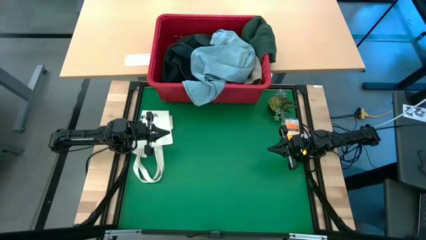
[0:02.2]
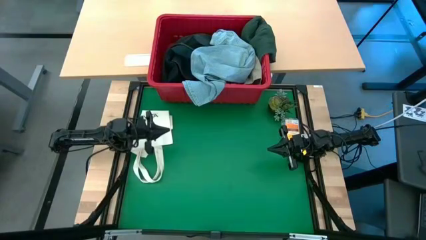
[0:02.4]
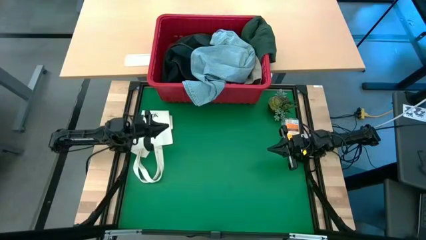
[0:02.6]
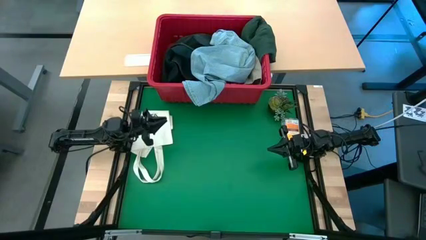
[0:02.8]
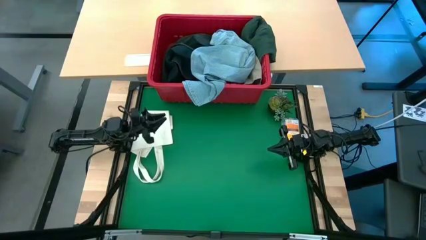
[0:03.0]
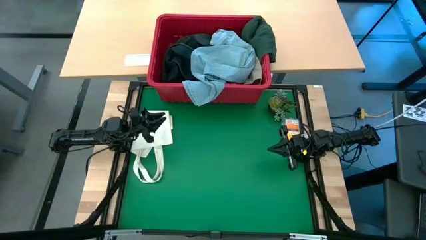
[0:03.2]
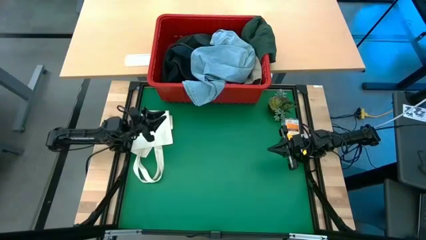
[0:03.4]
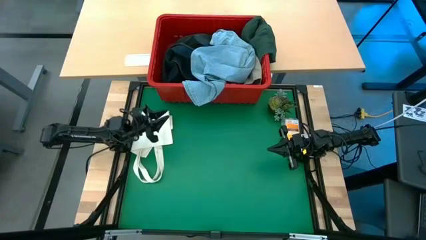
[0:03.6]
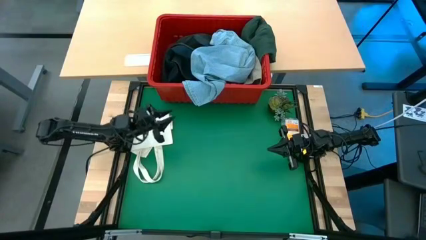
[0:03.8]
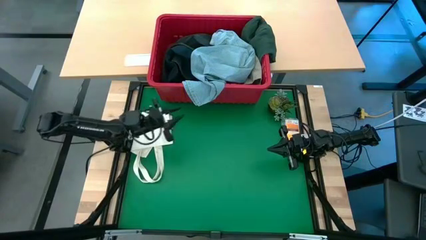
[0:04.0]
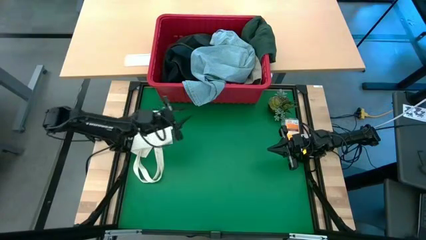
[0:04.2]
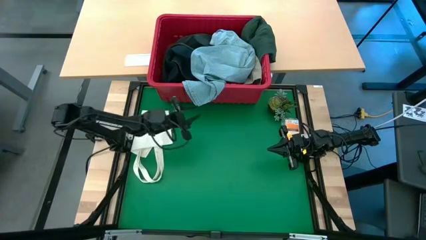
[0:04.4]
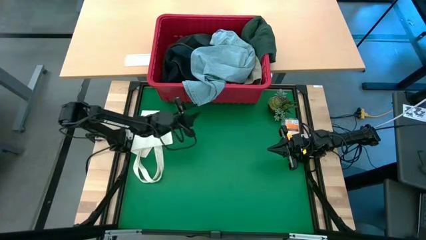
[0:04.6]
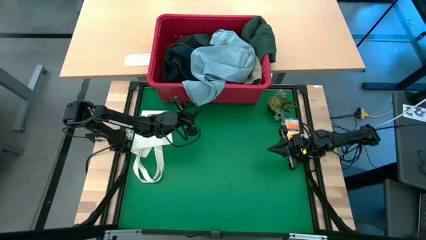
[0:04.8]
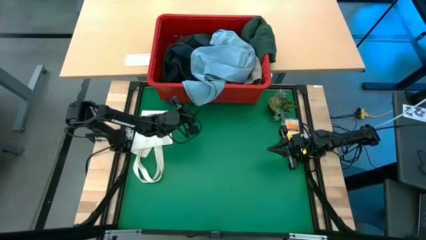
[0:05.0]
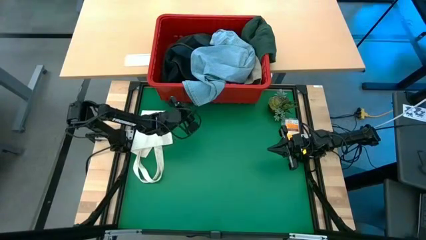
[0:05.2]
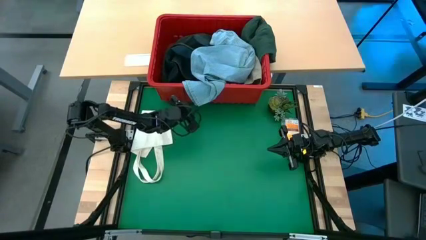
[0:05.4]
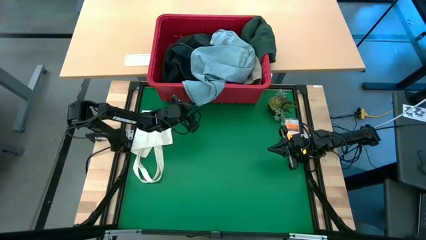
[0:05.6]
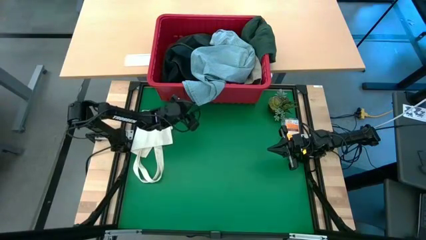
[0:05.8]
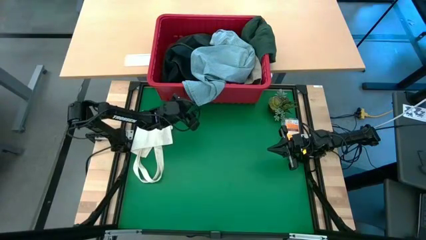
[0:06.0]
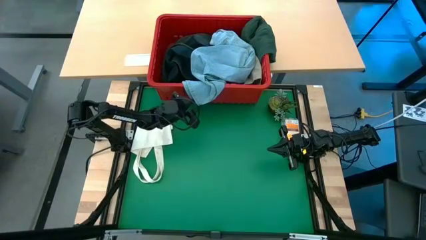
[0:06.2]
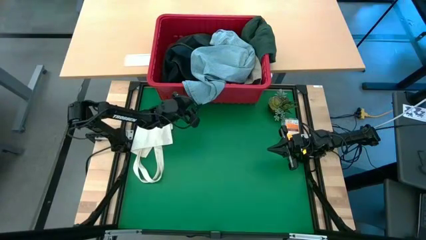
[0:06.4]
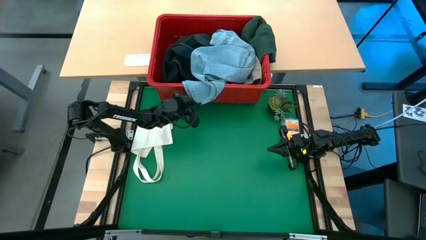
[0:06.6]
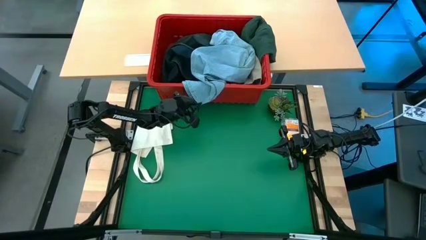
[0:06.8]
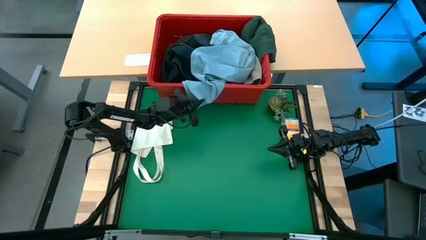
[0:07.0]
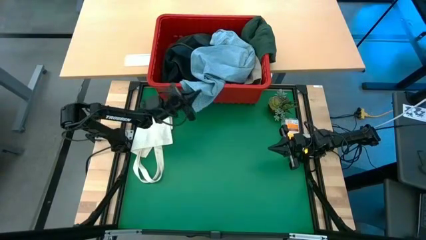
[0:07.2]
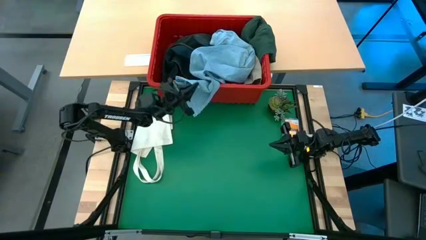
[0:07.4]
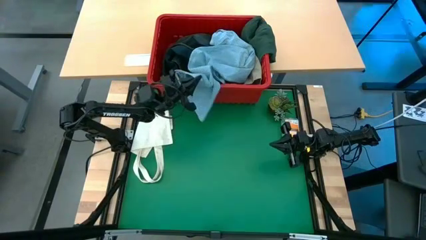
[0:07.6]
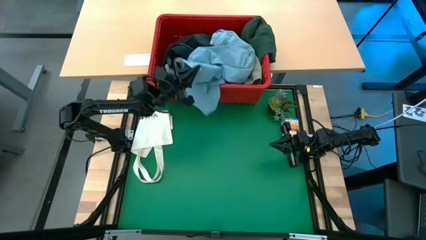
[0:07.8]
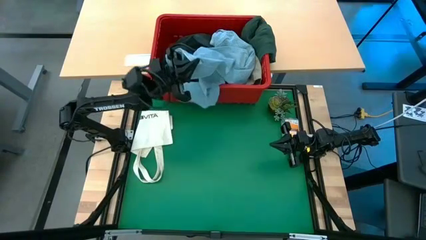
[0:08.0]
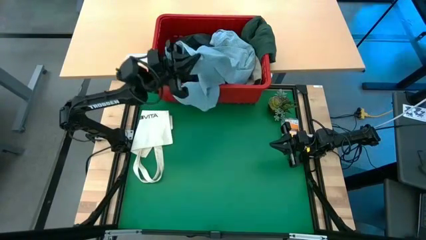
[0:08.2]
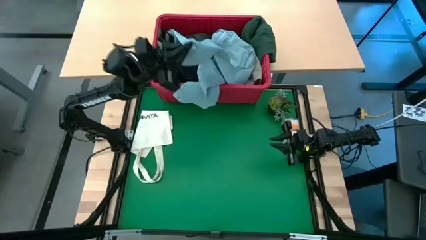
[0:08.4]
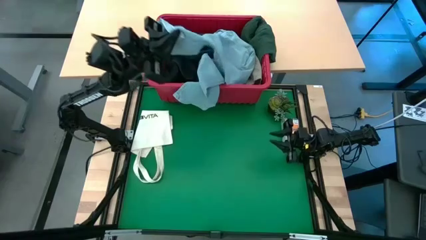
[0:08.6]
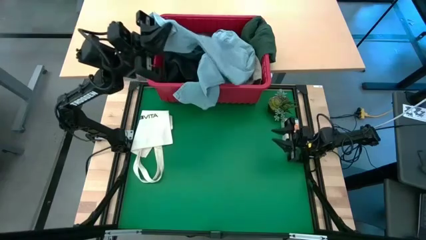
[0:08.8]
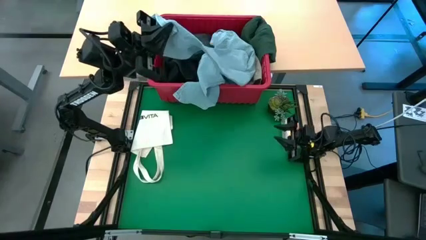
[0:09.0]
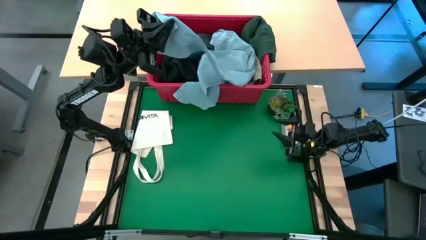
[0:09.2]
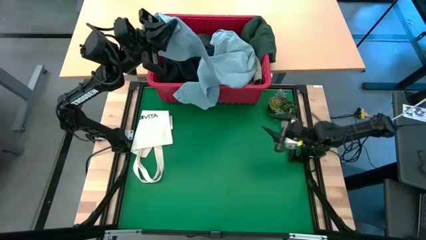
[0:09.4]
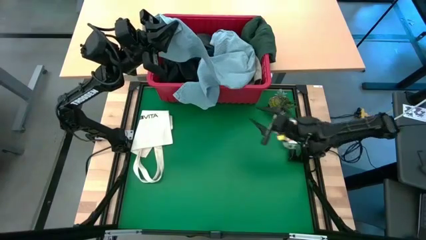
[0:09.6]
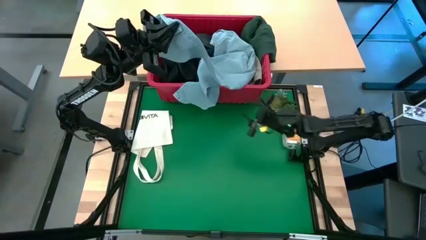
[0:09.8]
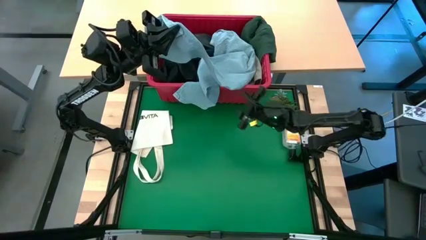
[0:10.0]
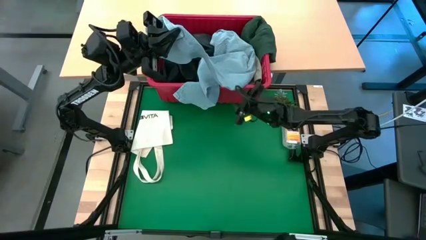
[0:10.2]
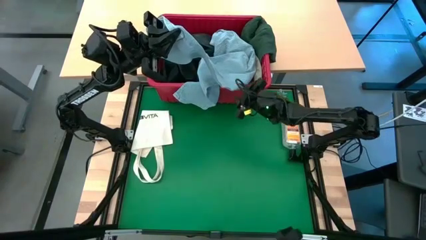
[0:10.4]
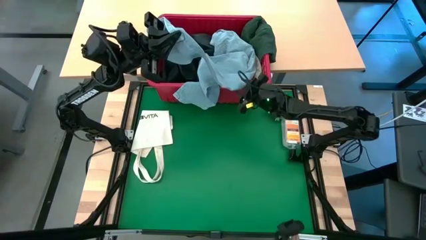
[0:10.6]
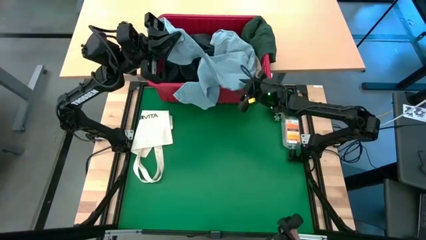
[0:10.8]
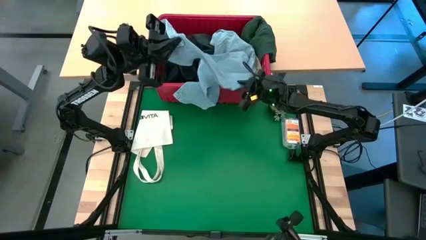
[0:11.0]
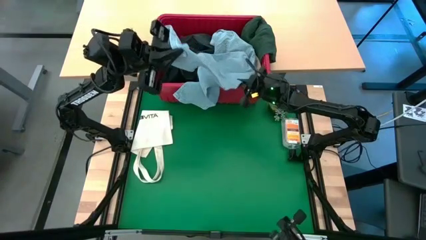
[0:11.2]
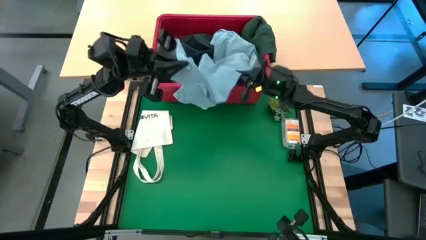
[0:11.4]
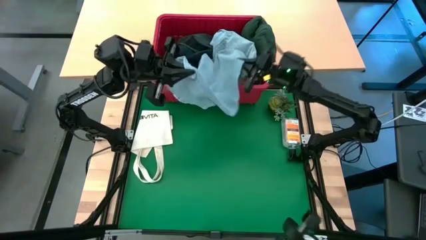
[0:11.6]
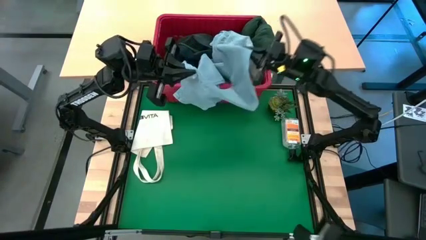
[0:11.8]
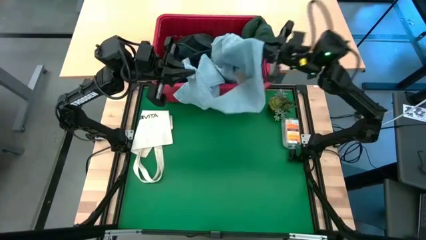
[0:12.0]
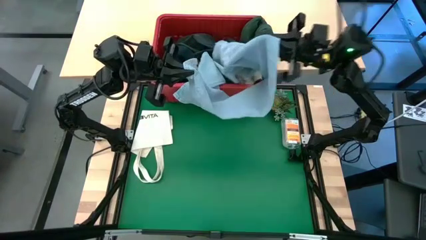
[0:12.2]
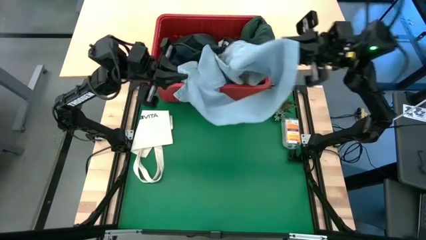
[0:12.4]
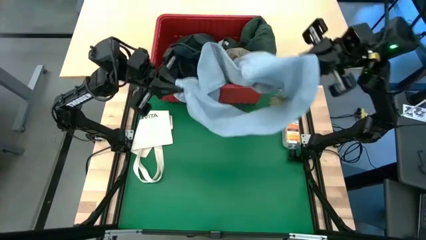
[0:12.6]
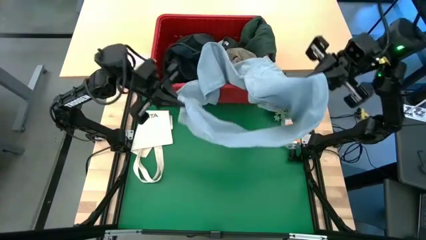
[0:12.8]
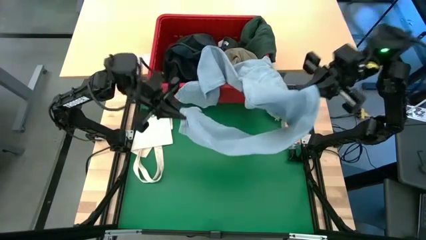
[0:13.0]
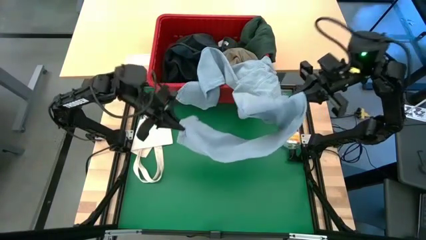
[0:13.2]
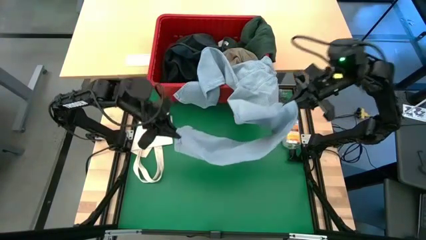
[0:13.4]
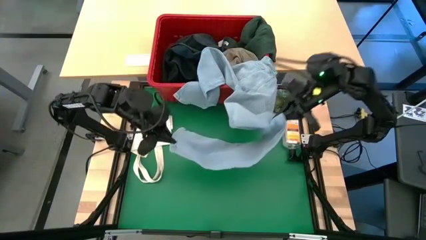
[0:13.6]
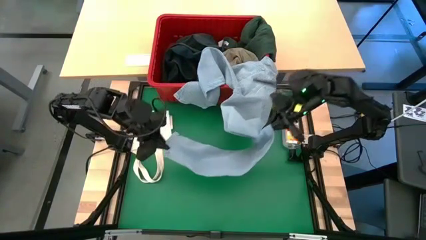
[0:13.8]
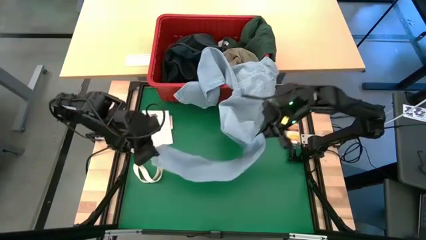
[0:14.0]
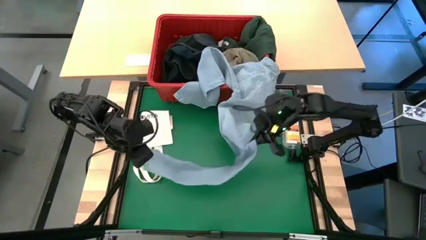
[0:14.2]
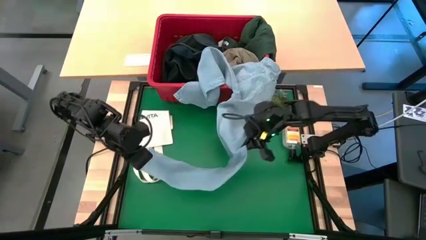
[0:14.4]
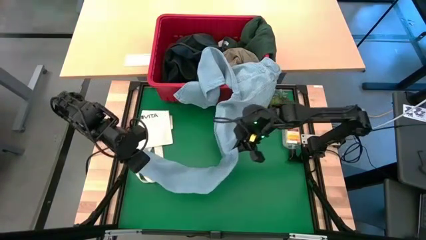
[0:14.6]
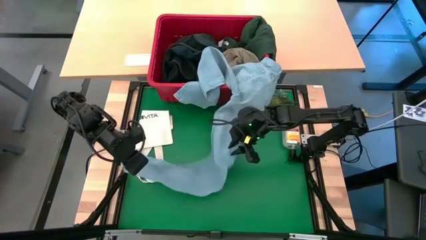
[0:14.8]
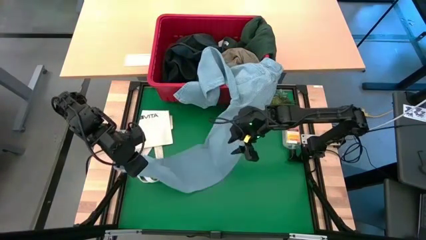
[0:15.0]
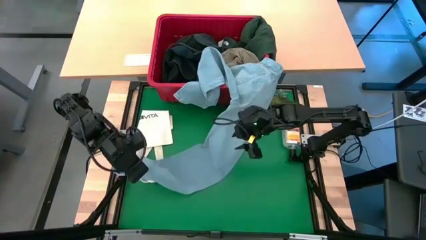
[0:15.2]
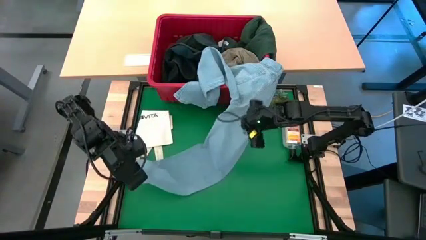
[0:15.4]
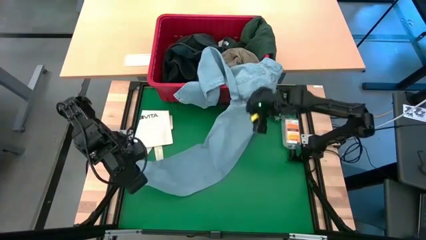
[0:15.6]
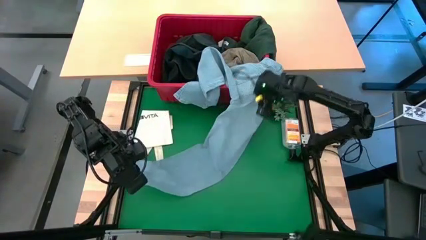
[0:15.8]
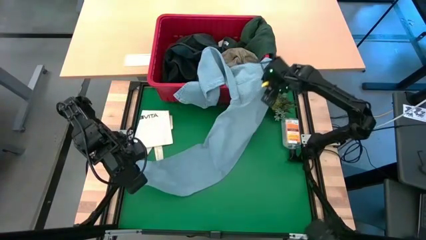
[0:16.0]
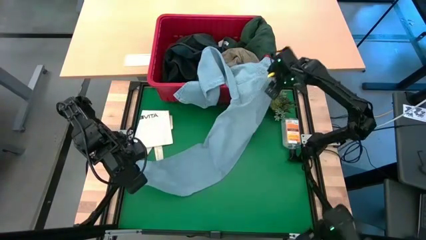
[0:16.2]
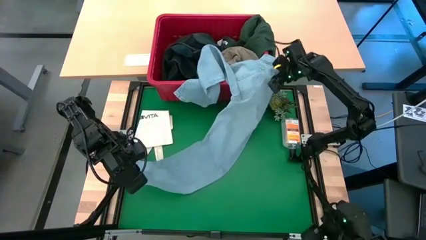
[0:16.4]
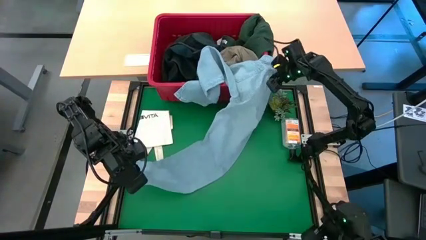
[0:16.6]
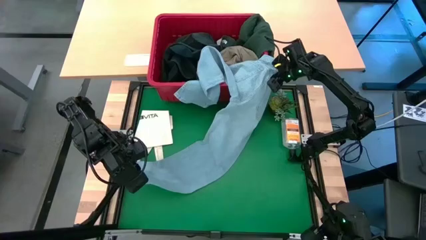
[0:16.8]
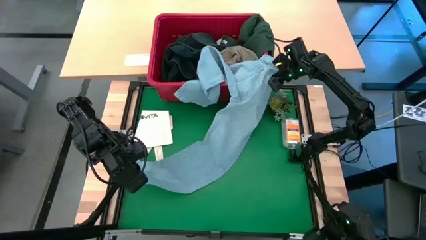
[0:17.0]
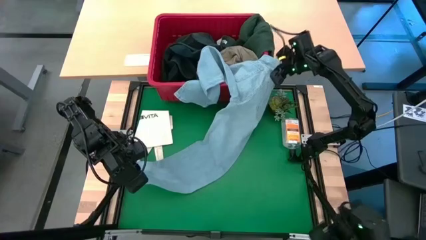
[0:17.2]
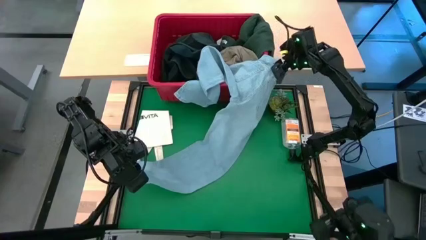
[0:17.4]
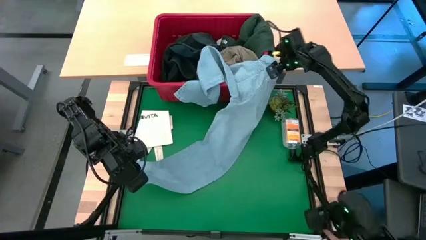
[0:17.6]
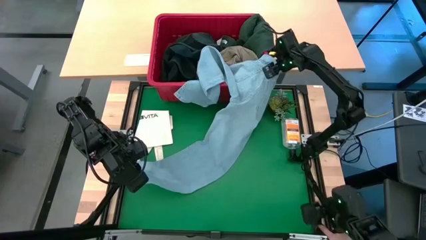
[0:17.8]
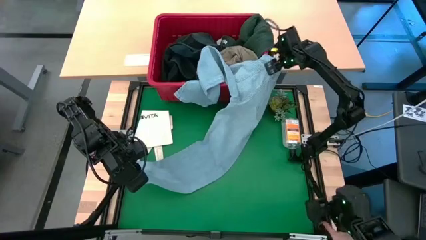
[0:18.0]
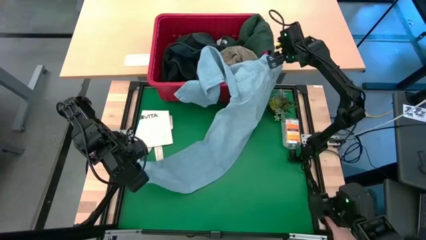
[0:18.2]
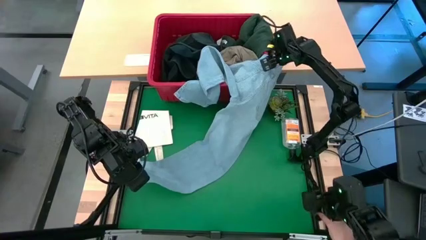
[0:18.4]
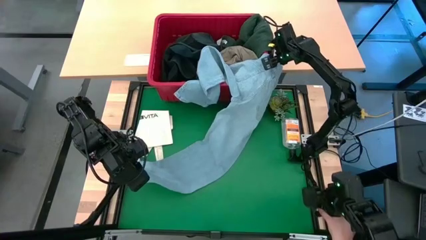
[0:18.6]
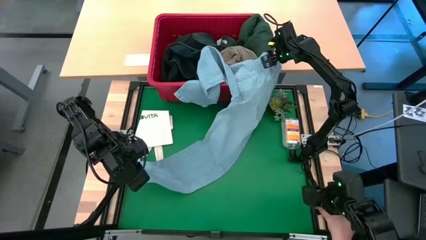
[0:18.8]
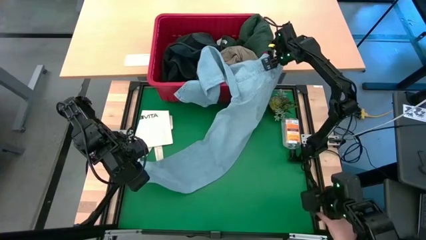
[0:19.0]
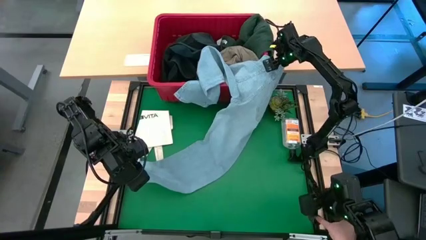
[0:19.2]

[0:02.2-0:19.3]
Task: Fold Laundry from Bin
Remove the light blue jeans from the red bin
